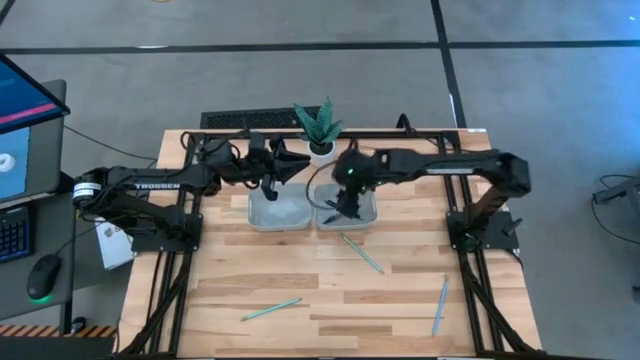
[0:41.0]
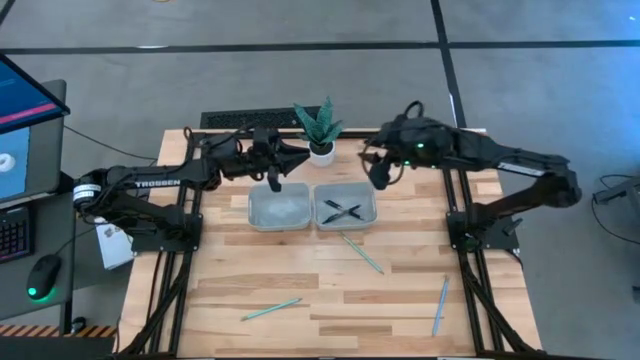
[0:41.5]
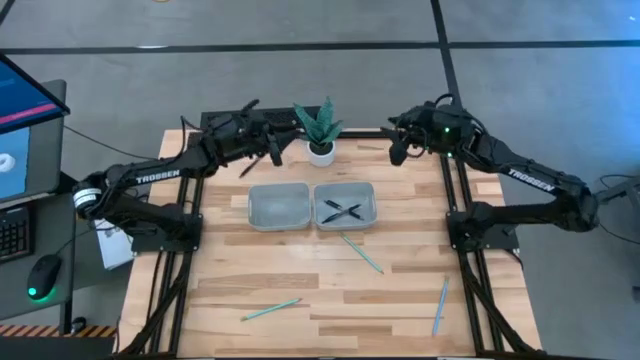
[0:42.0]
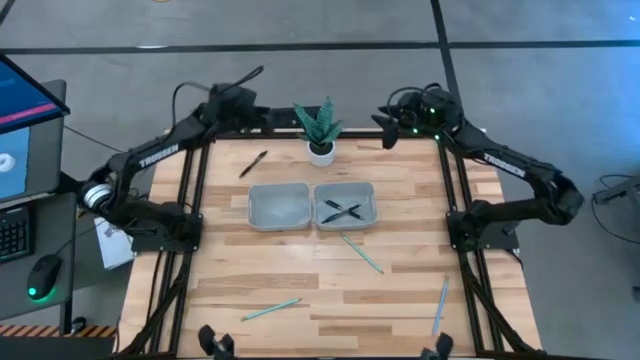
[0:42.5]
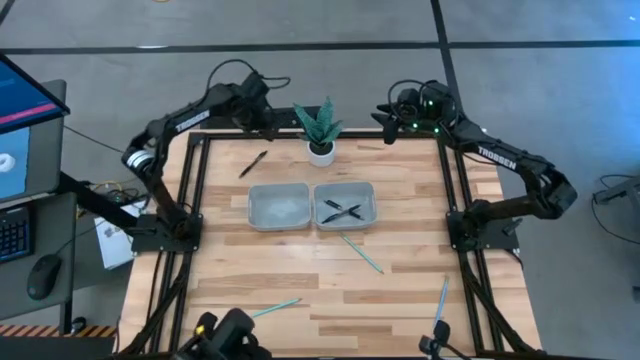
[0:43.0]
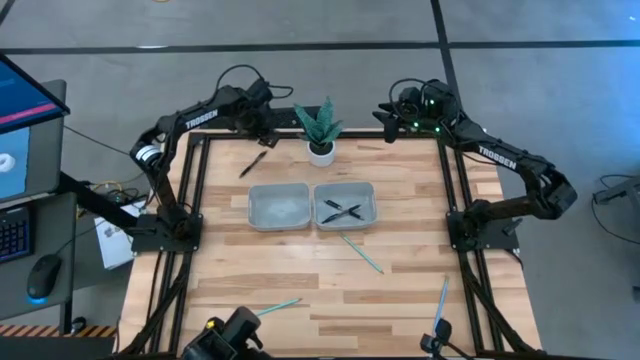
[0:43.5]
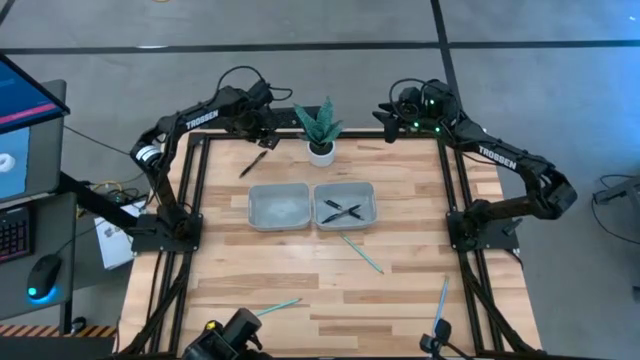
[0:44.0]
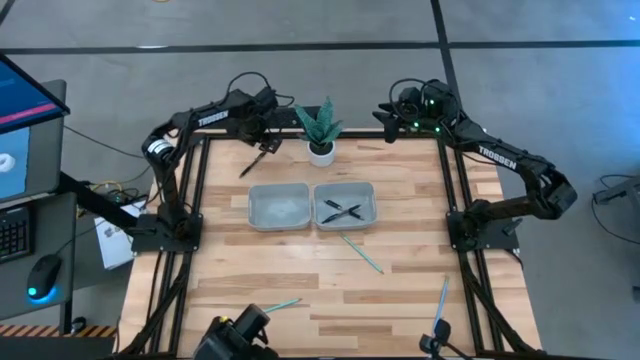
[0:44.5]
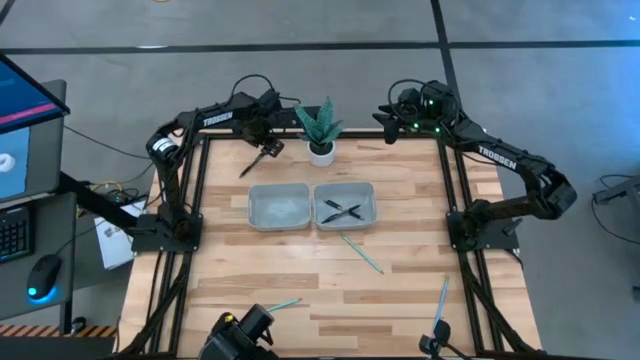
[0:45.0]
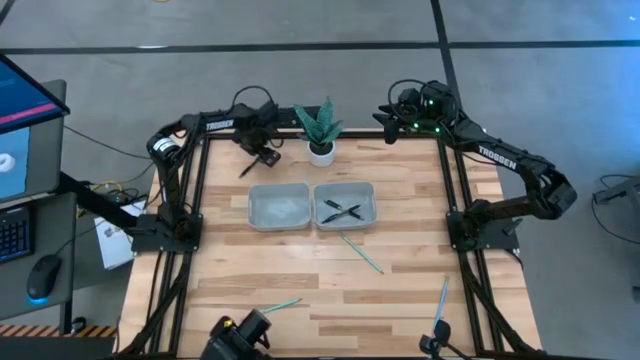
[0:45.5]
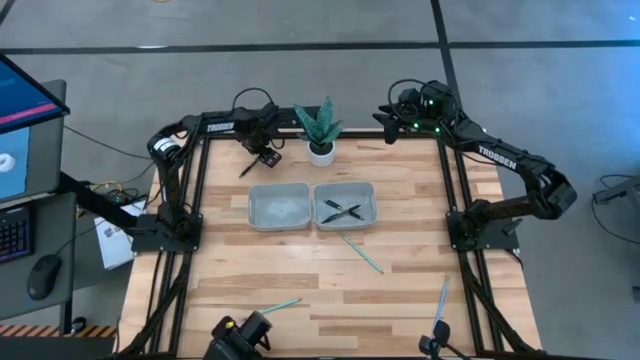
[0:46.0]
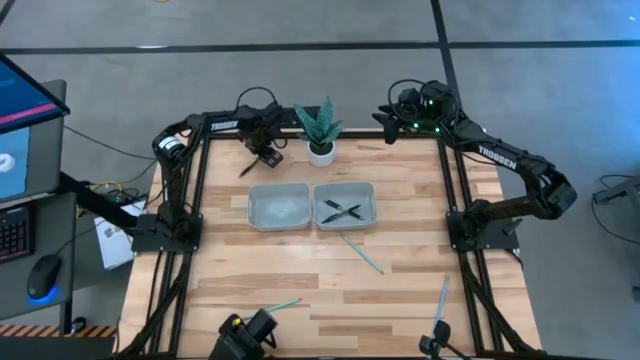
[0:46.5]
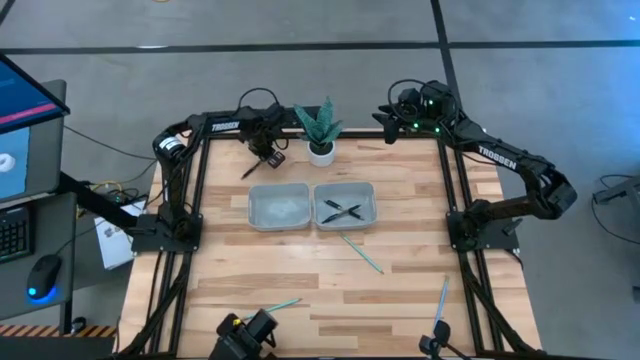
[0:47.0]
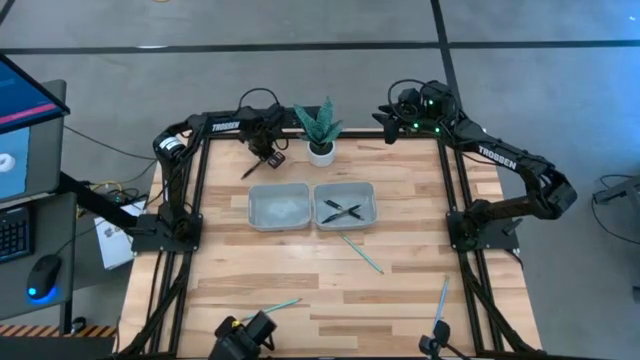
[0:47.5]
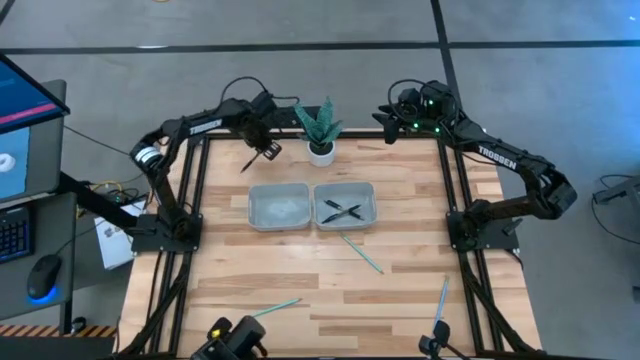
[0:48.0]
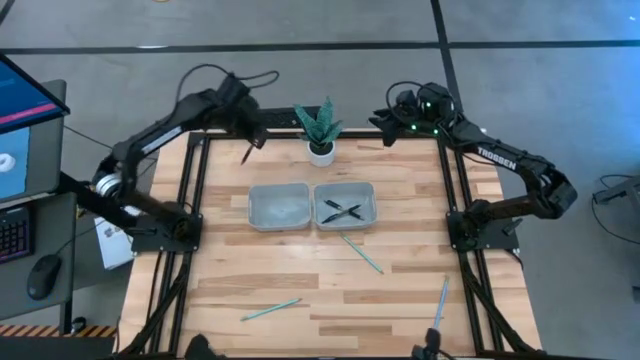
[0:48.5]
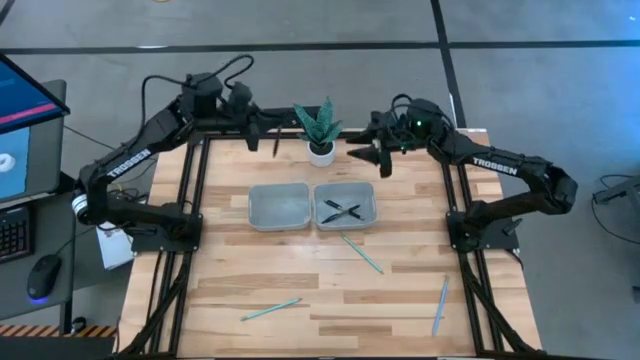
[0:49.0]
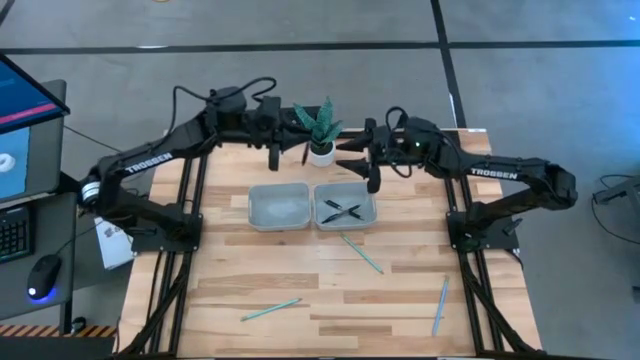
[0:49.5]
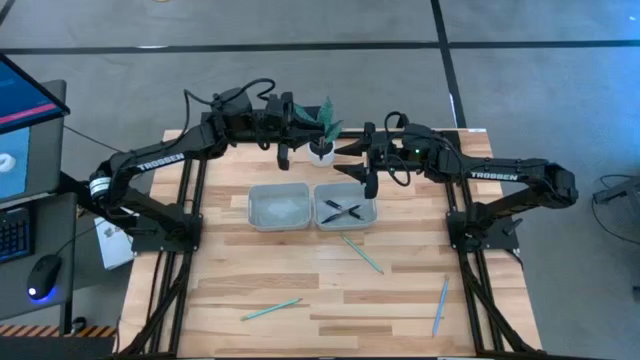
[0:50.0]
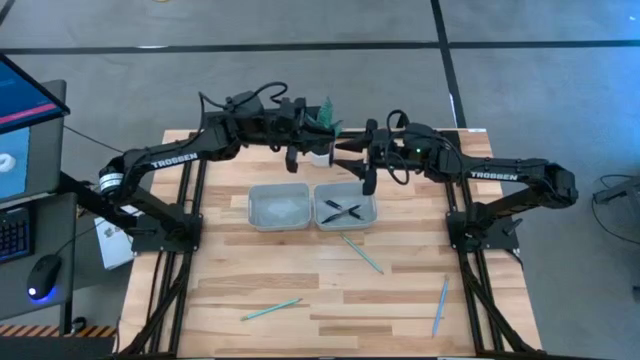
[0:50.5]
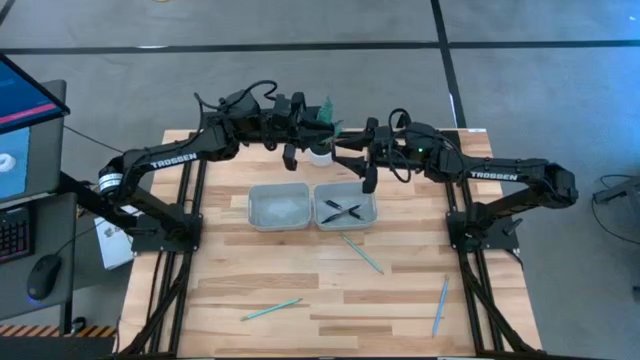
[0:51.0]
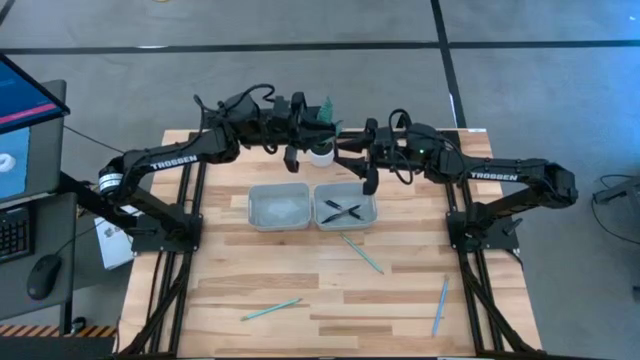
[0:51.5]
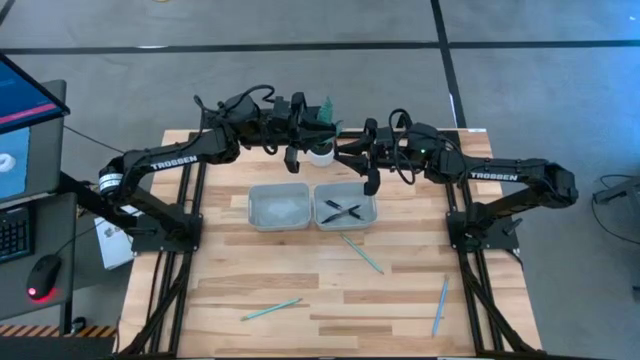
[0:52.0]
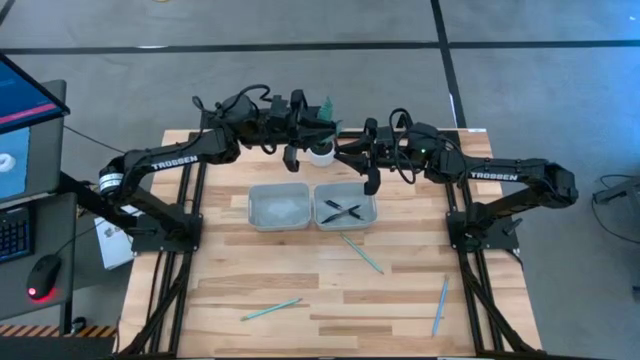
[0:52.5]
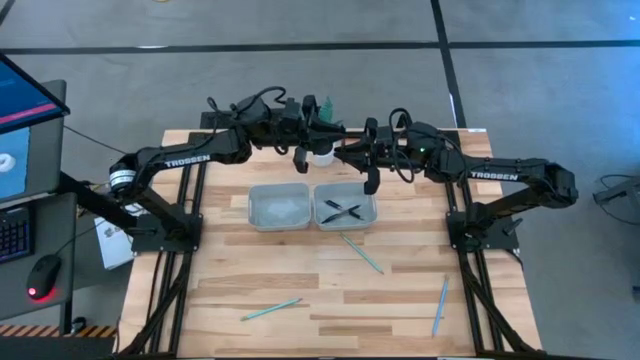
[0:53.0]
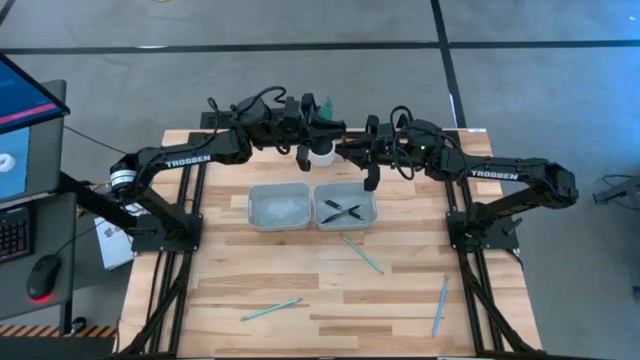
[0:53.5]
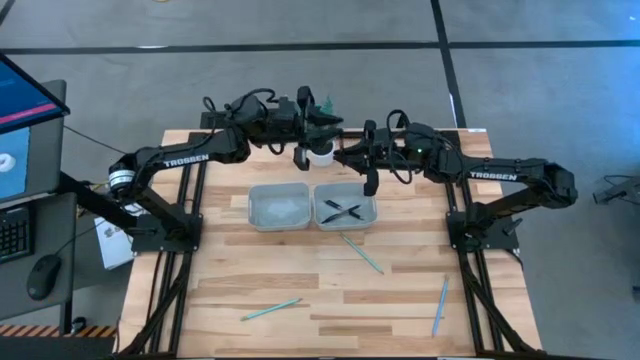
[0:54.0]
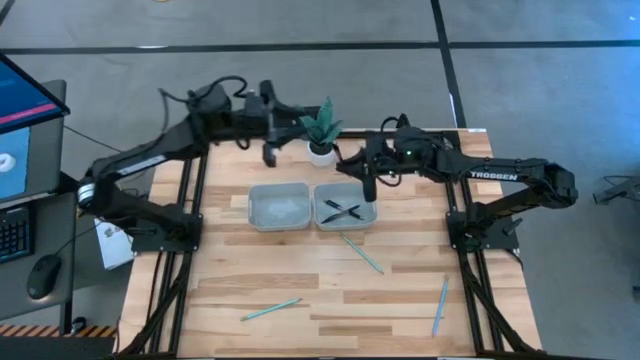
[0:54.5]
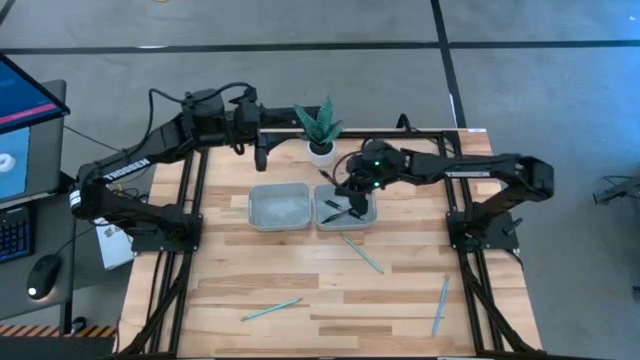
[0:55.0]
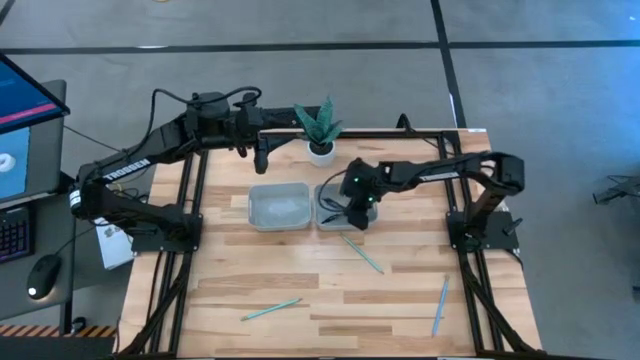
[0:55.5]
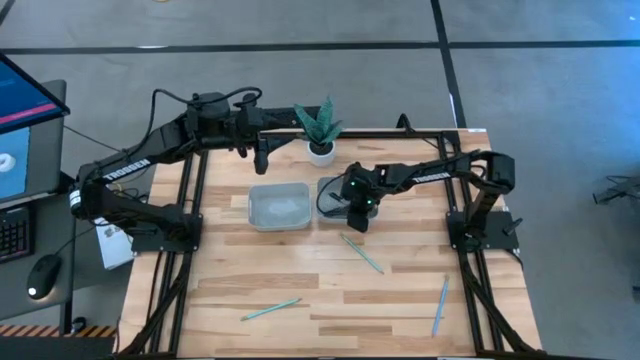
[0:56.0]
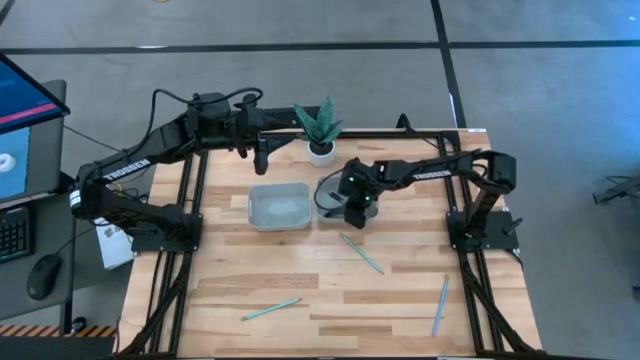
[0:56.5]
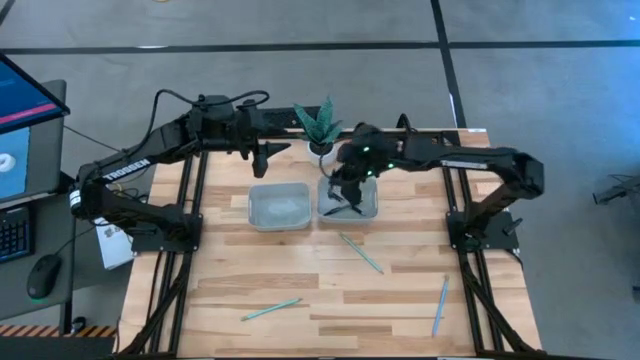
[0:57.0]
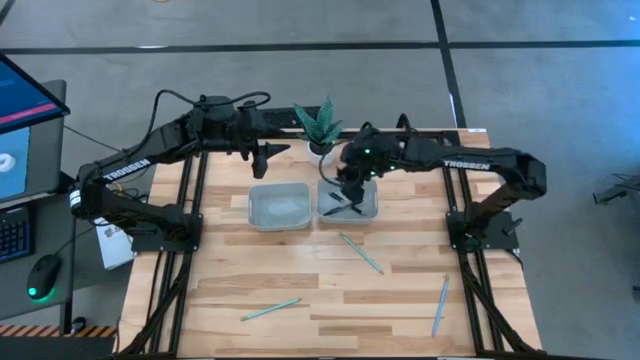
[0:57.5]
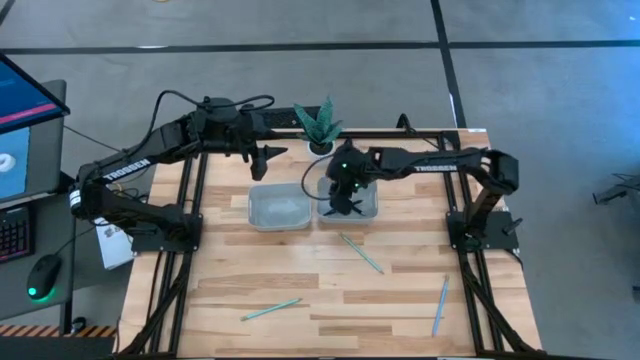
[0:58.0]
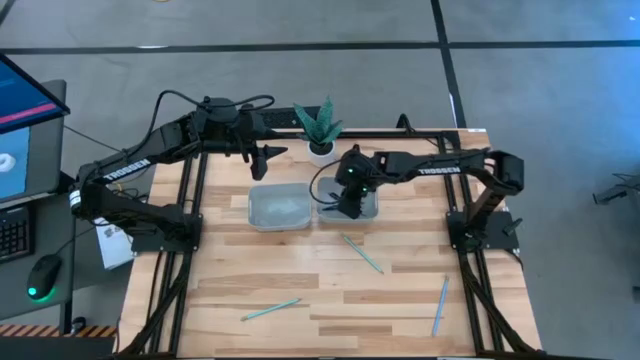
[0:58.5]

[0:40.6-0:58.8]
Task: Sort pens & pencils
Put the black pen into the right gray bin
